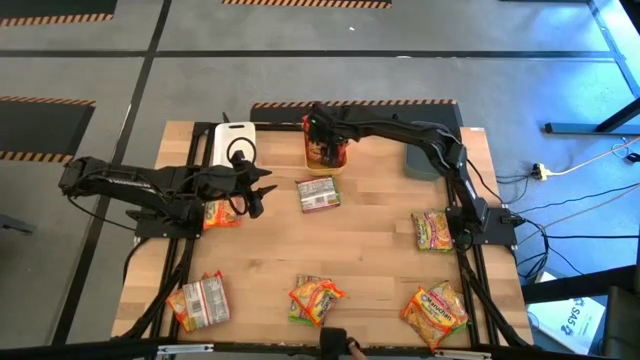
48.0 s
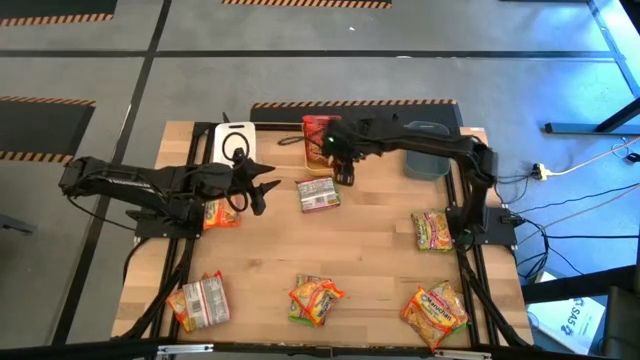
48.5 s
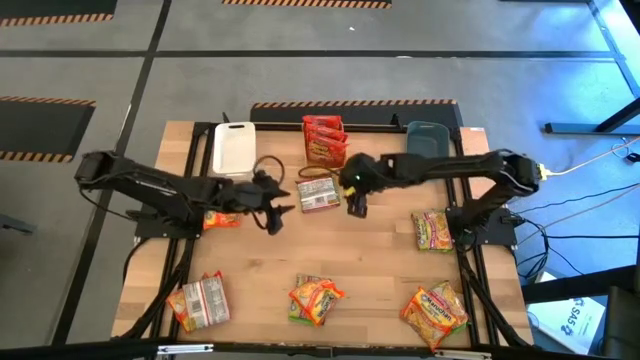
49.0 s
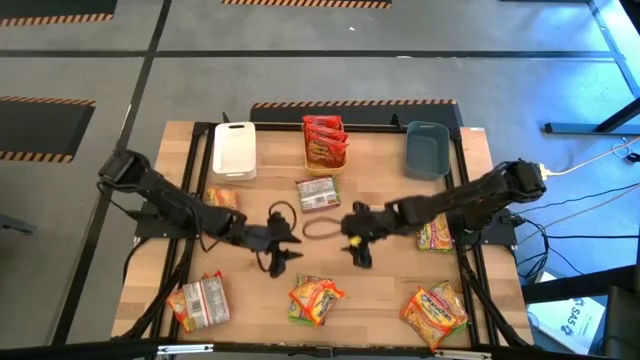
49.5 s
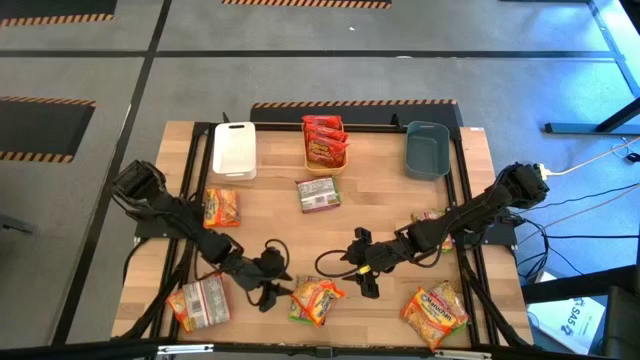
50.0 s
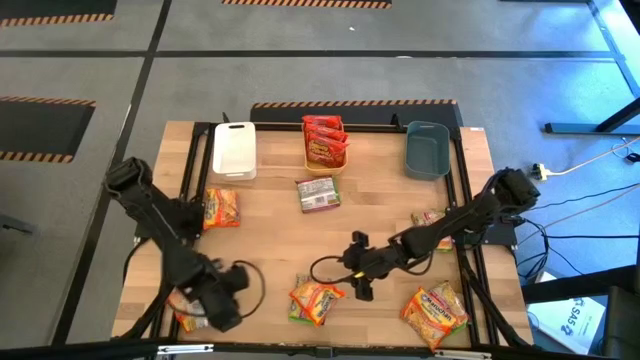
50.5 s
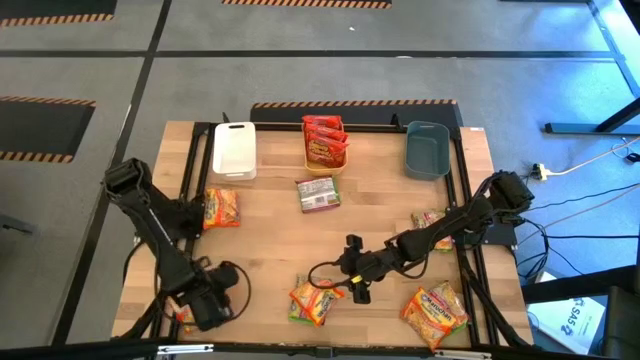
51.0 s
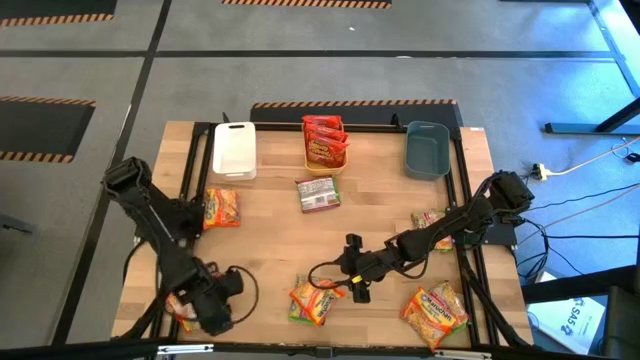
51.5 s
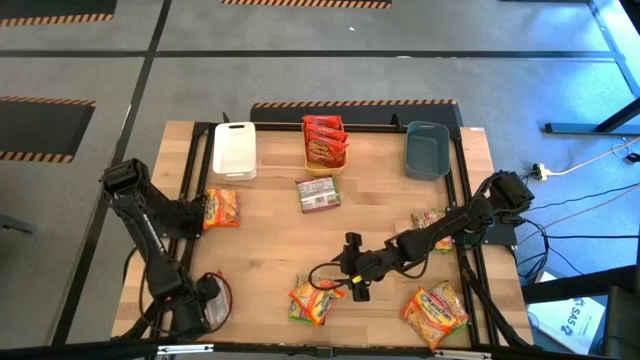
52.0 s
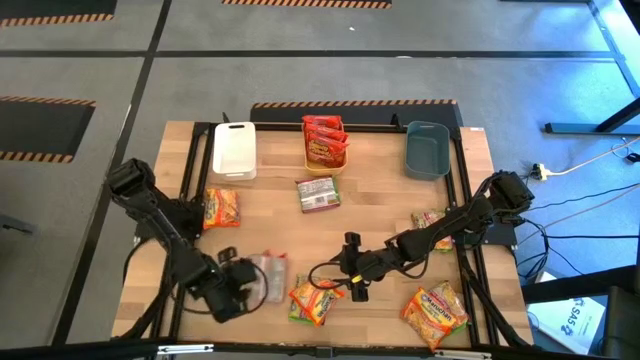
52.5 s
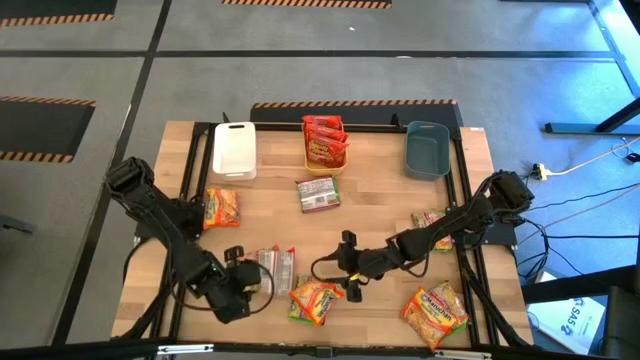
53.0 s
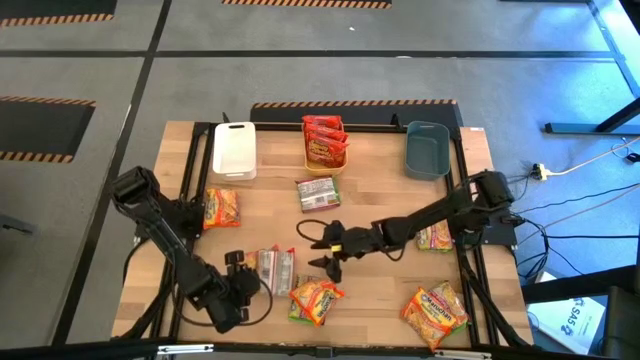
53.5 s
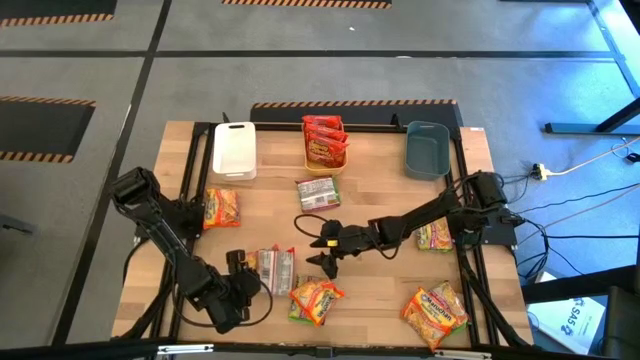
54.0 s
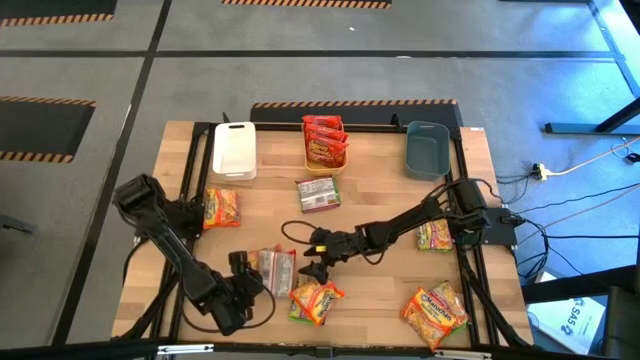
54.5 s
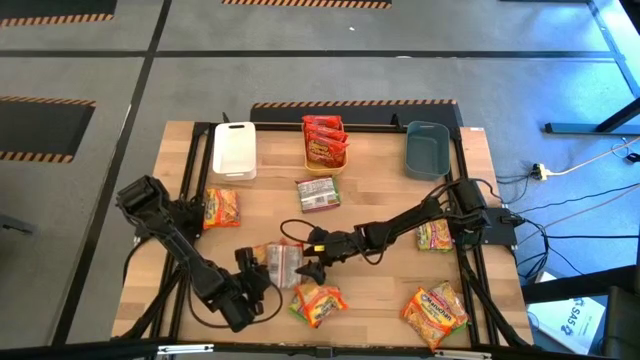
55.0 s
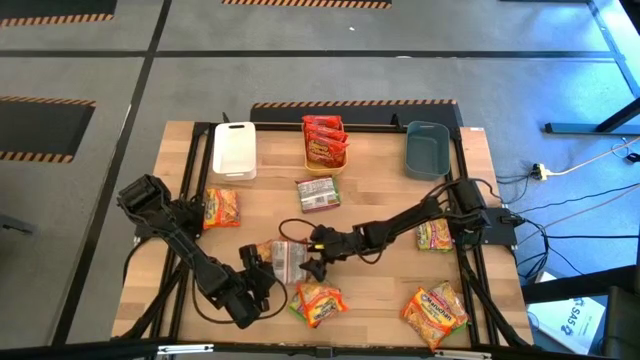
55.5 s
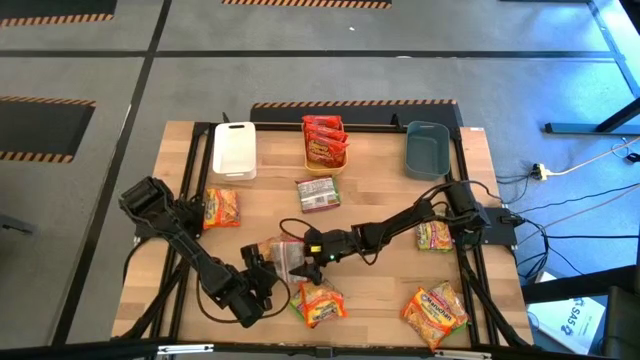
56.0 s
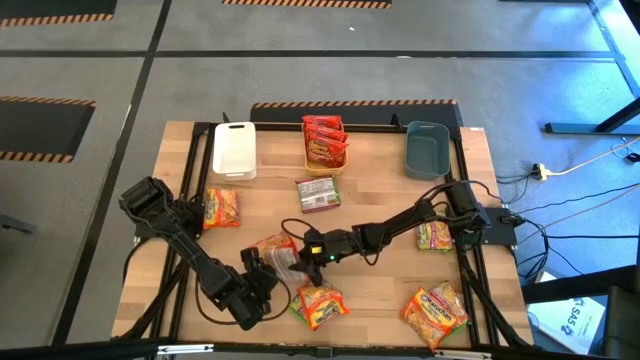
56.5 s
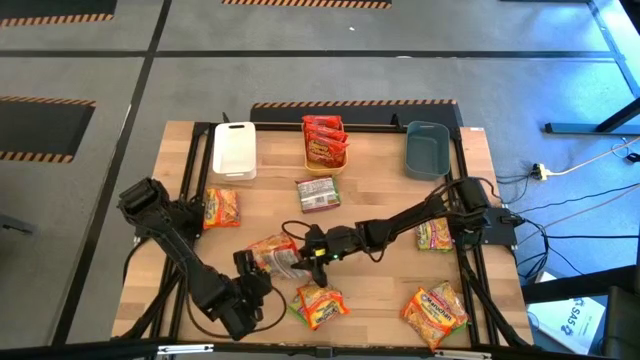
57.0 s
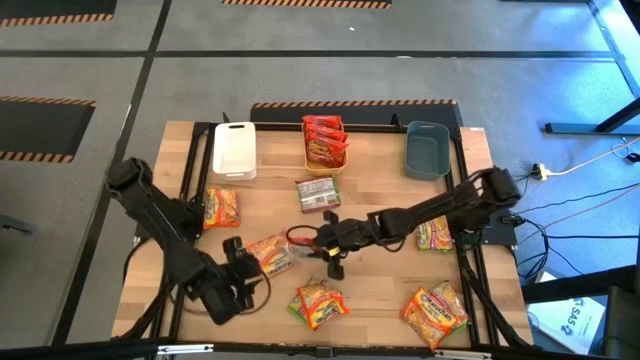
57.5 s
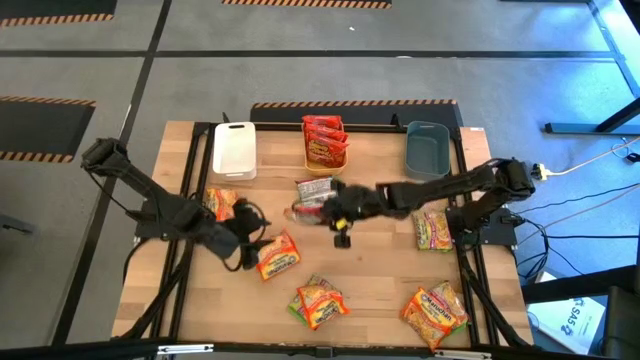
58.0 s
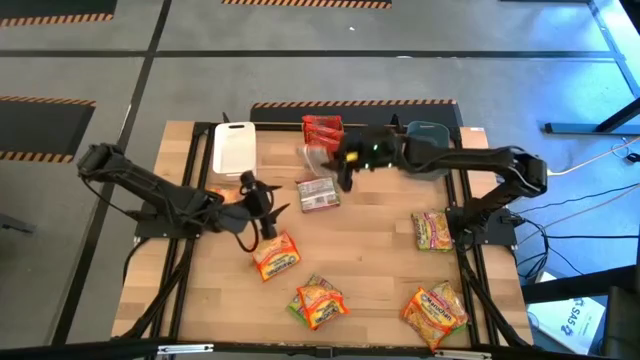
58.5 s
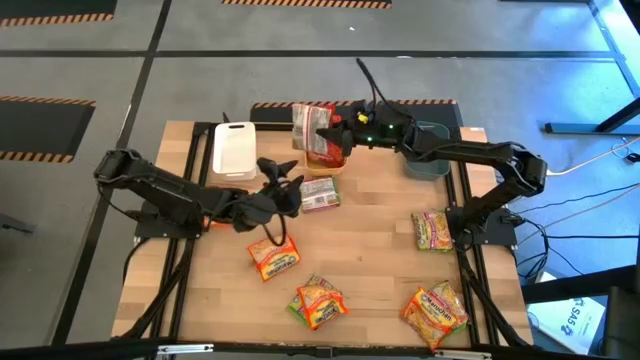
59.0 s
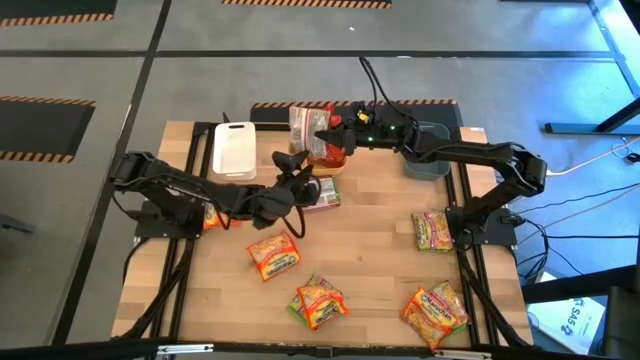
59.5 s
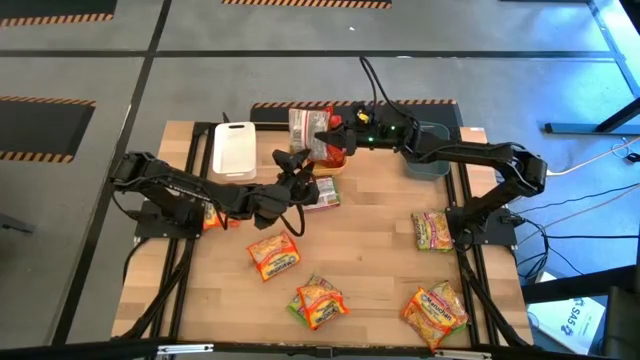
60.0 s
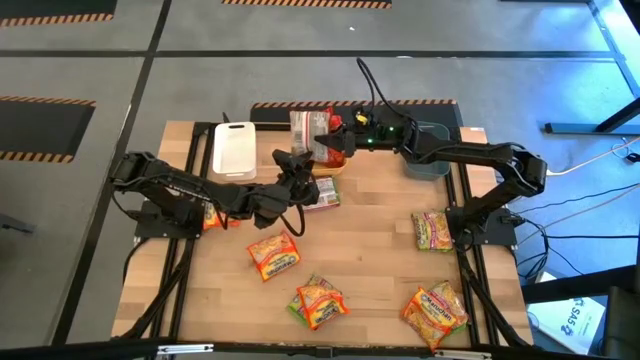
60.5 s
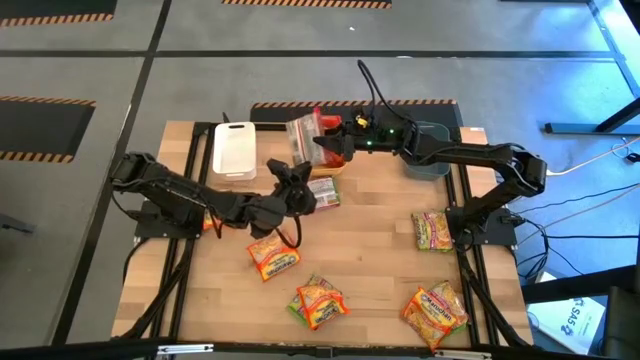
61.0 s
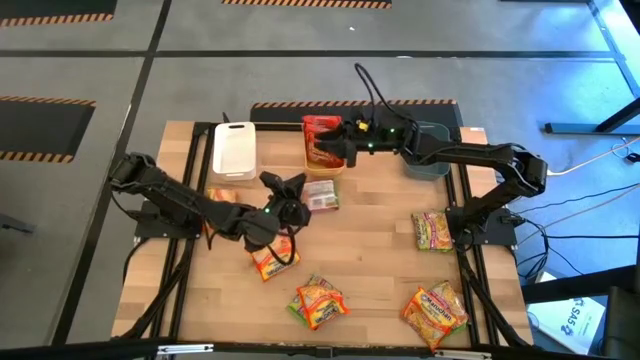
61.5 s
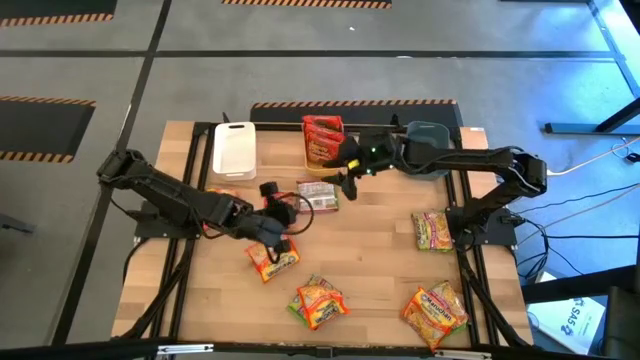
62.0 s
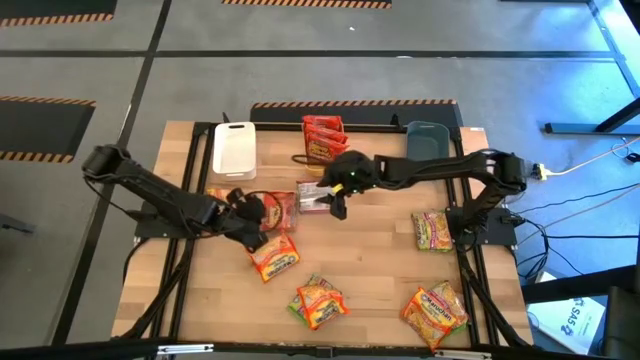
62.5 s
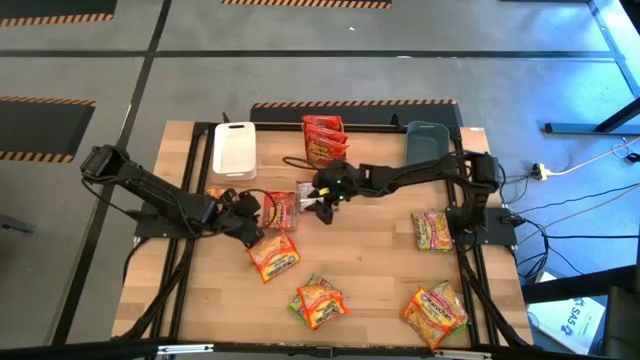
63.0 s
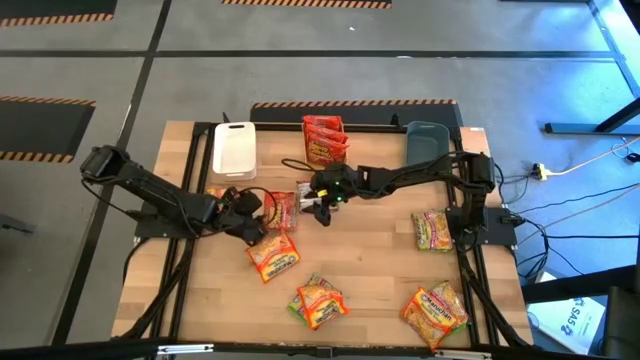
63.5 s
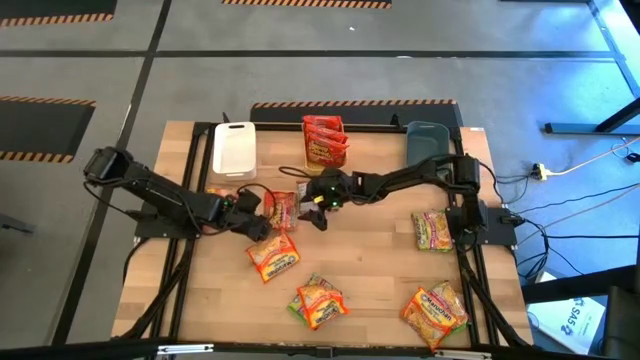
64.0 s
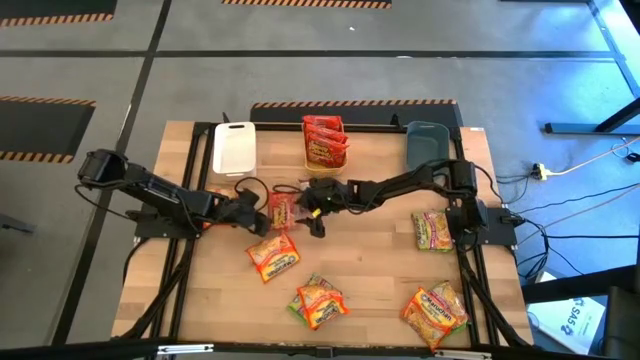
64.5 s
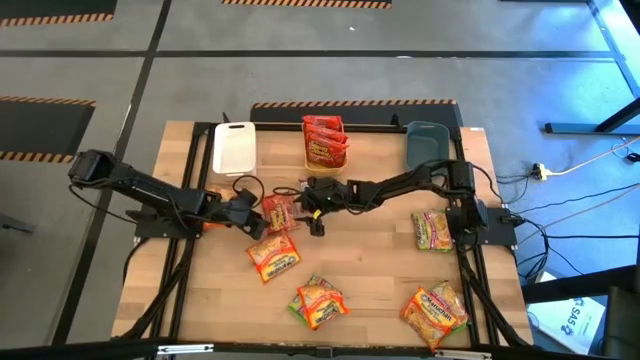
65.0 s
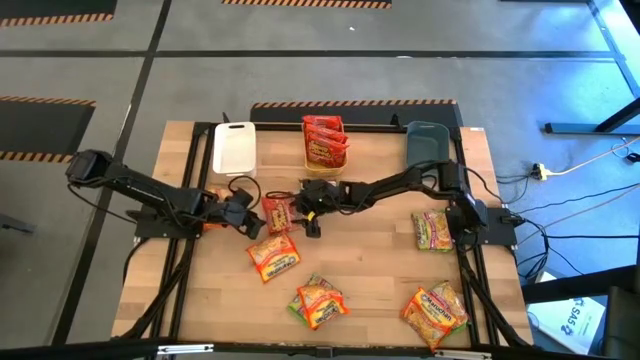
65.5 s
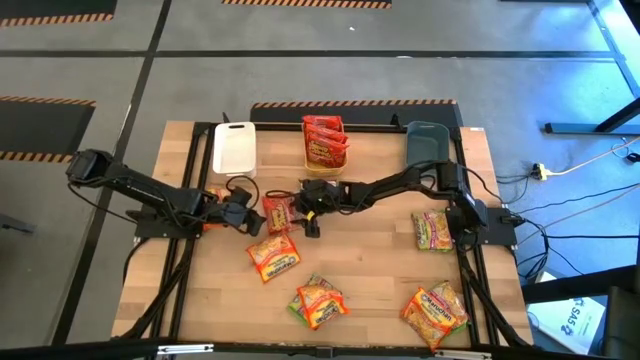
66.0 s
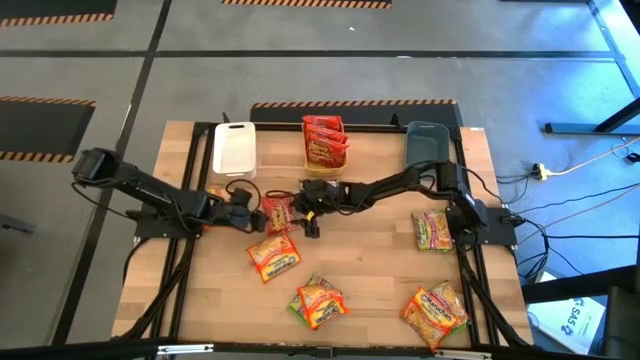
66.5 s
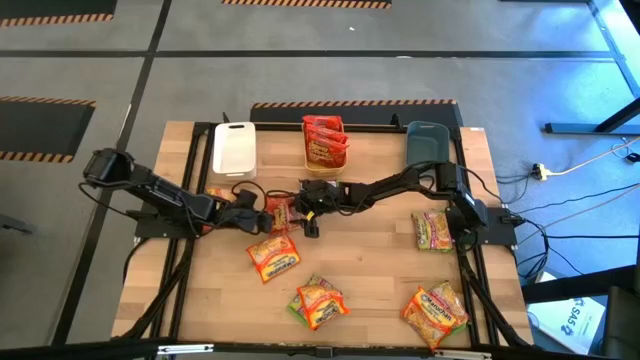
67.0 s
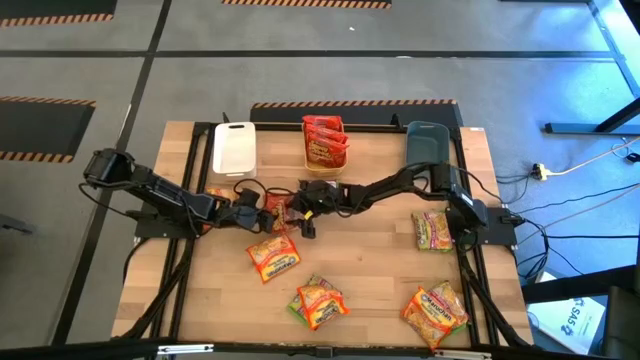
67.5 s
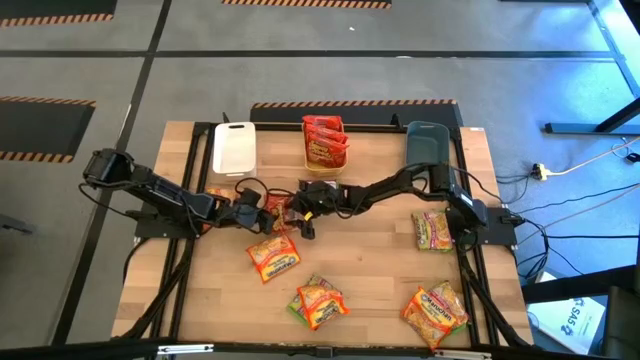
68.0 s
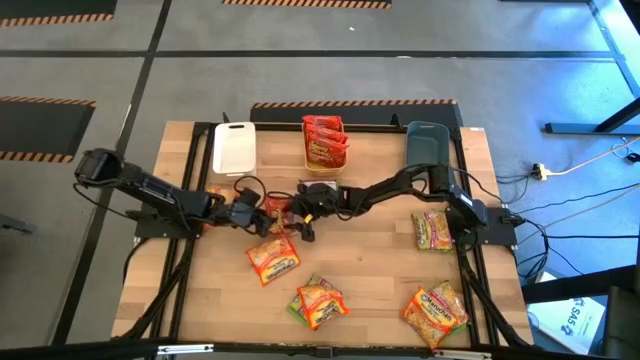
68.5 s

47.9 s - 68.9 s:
Task: Sort Maruchan noodles
Put the orange noodle pack into the yellow bin

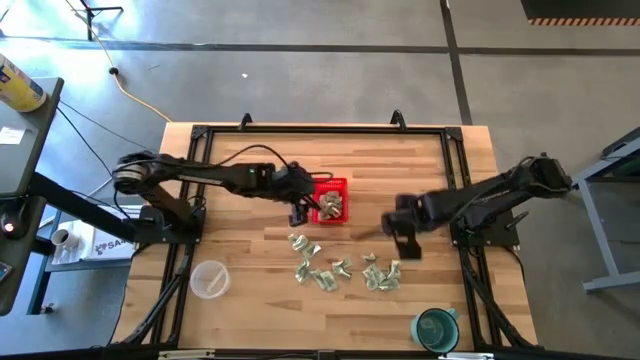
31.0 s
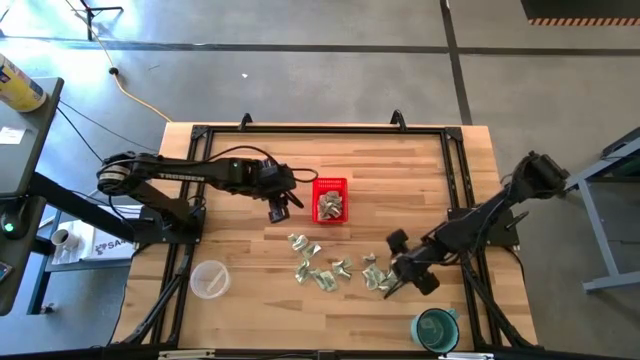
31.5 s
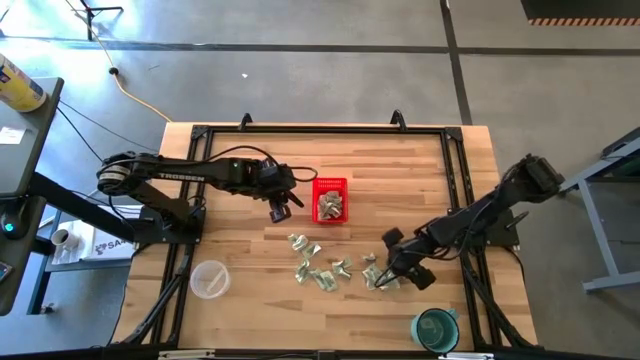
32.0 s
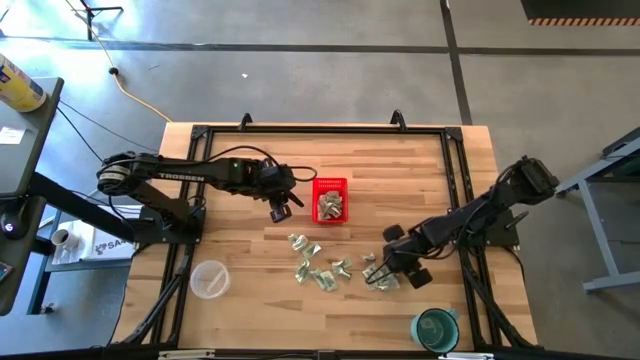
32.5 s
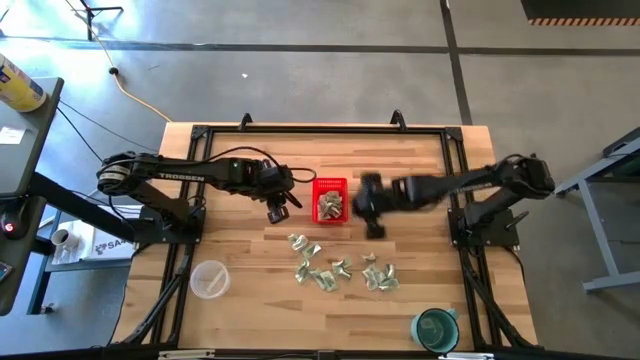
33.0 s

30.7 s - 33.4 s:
Task: Pick and place items into bin
Put the light green stevia packet into the red bin
